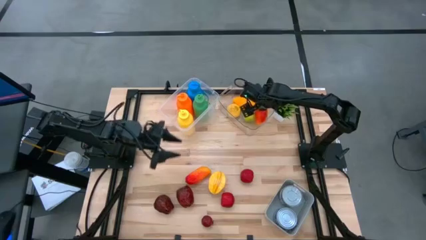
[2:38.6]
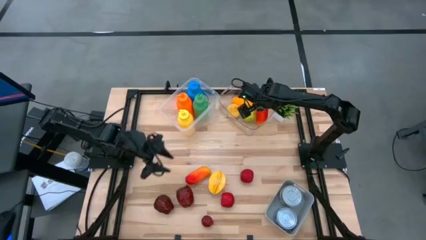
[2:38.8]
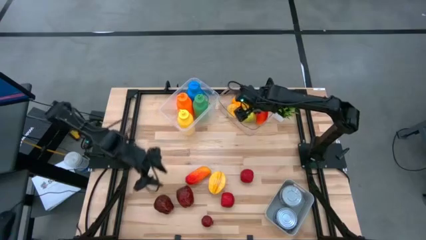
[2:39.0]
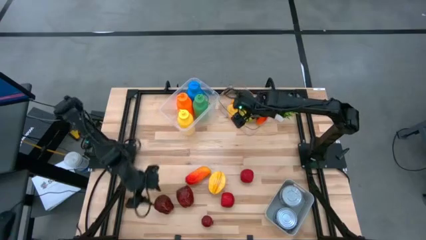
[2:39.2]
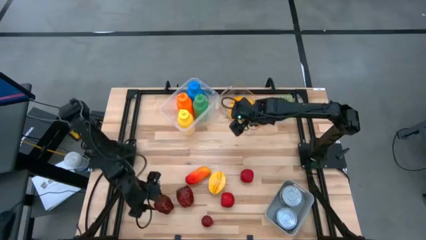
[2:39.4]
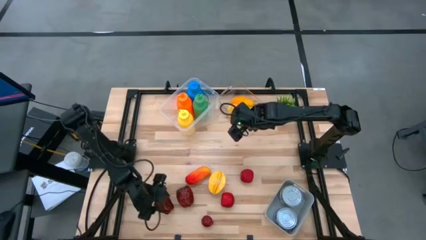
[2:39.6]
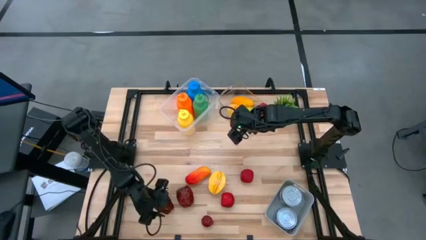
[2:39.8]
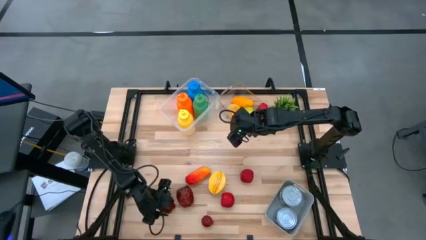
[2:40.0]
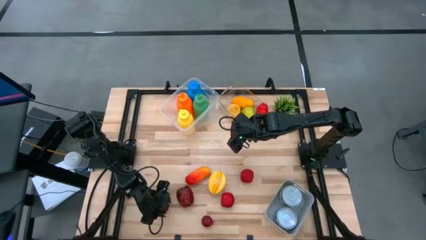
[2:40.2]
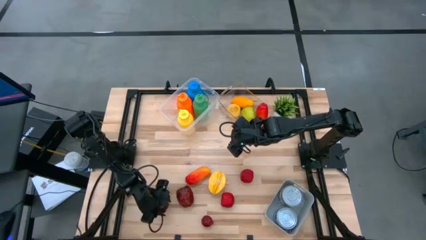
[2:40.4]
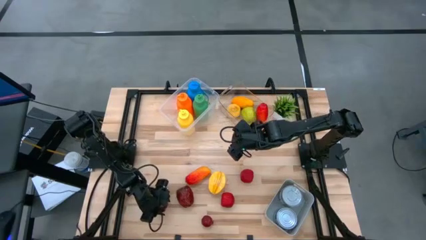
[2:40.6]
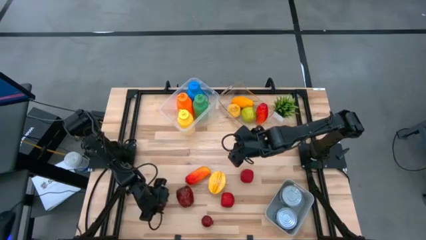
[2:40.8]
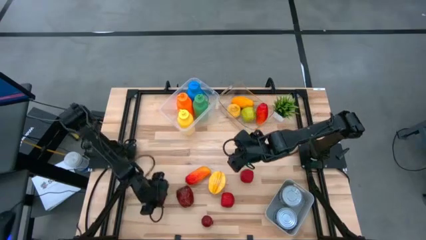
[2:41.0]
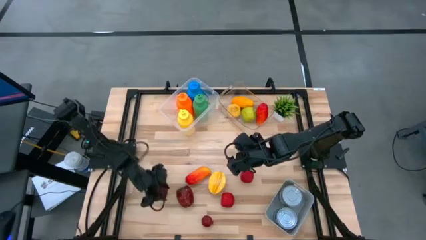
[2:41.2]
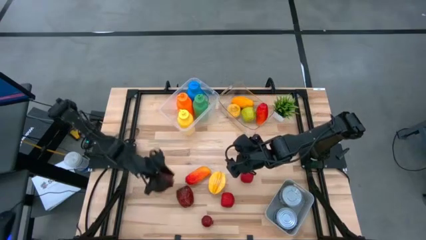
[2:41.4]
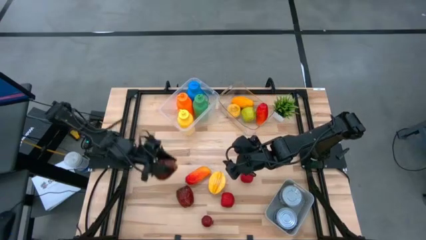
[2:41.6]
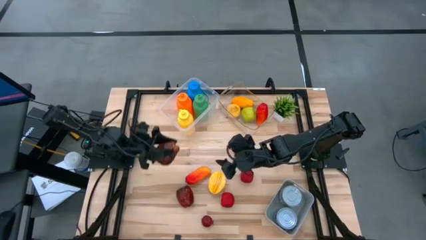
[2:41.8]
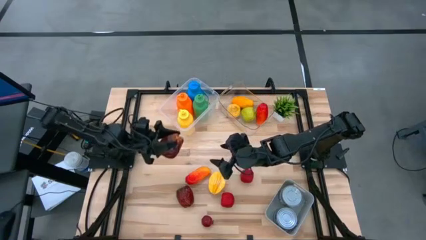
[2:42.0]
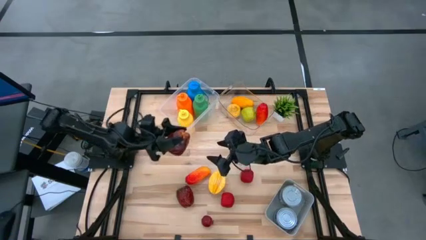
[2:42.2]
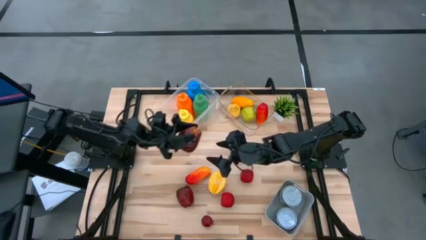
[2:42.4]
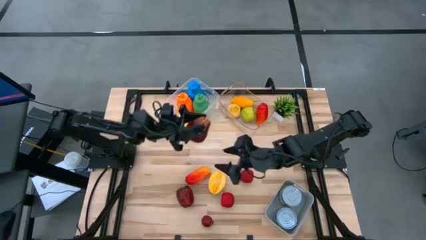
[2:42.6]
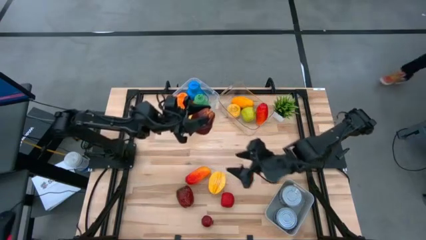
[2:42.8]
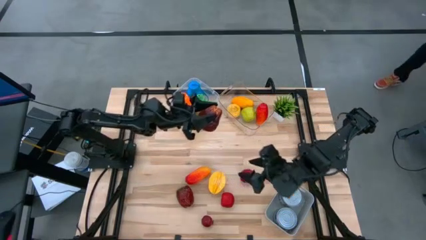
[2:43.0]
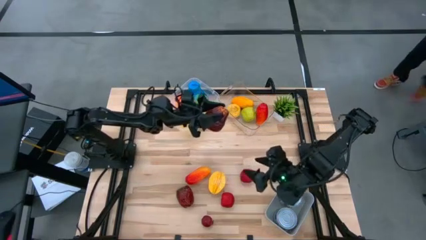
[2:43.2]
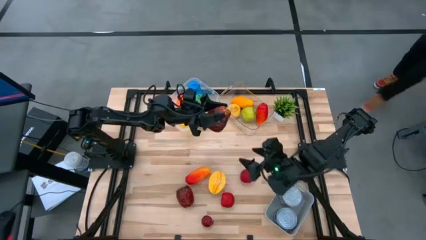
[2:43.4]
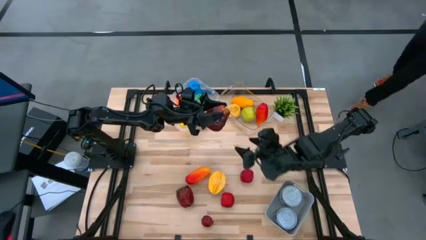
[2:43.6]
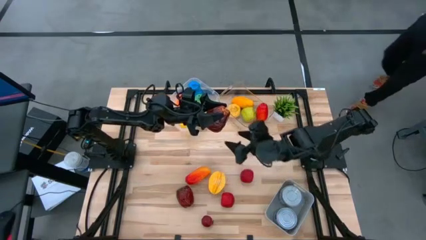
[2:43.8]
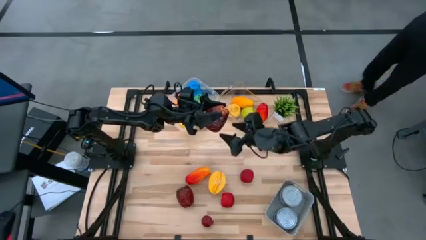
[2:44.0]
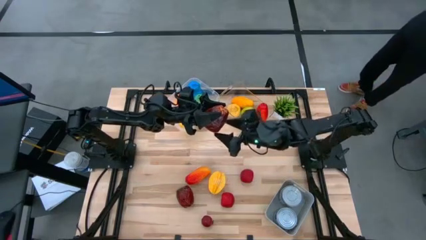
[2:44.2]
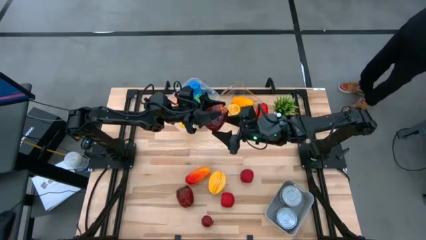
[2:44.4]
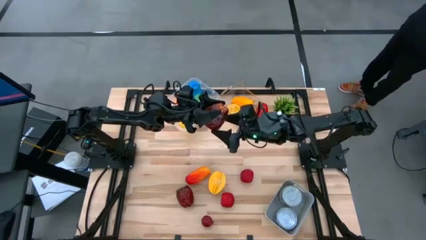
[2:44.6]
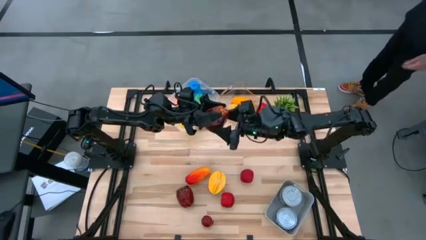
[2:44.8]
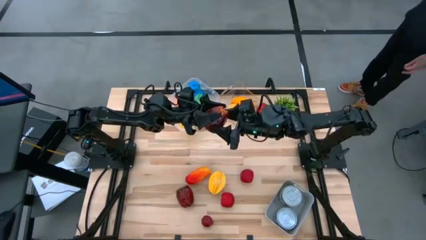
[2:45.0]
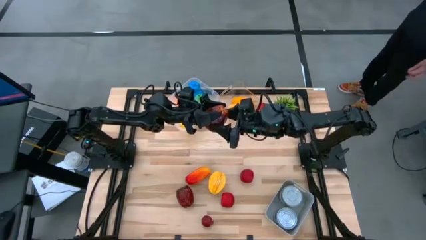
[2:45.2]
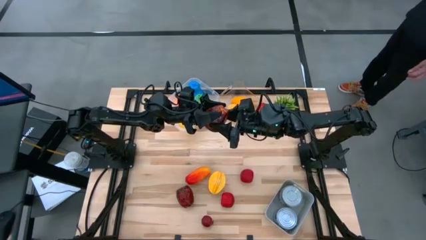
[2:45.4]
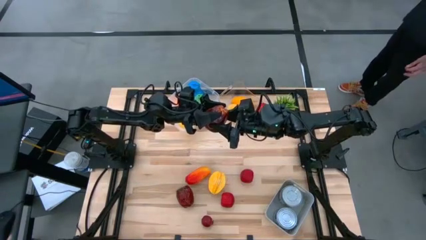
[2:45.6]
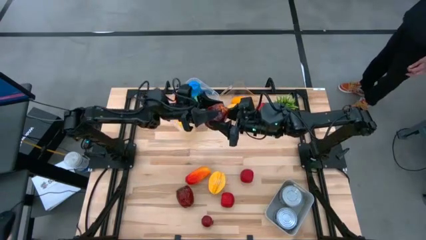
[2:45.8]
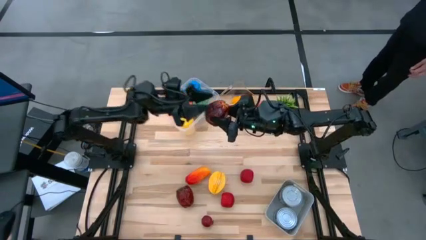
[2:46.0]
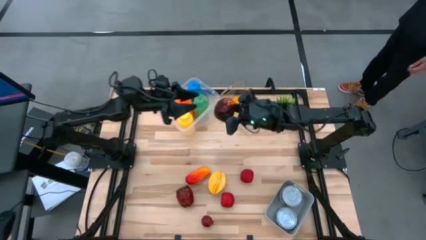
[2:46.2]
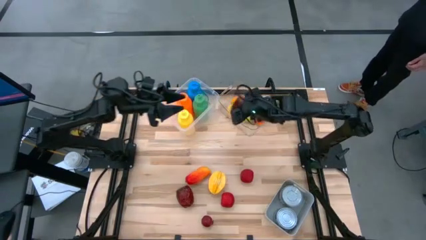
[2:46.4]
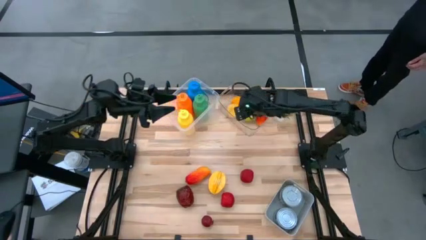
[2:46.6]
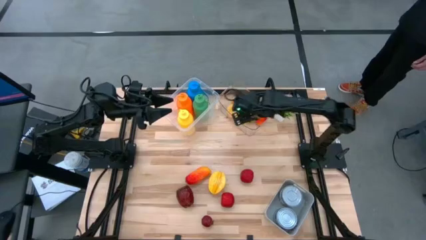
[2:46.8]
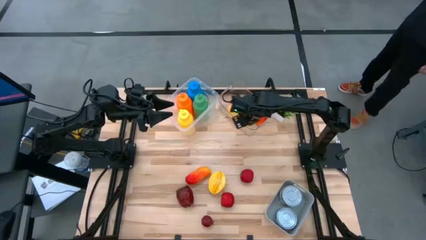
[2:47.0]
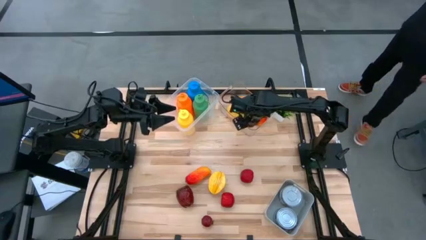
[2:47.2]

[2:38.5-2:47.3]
Task: Pick & Place Food Item
Put the left dark red apple into the right transparent bin

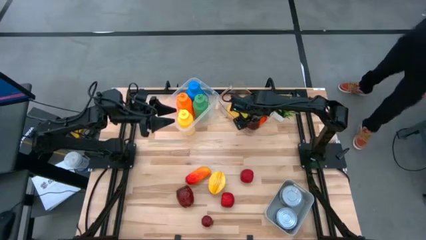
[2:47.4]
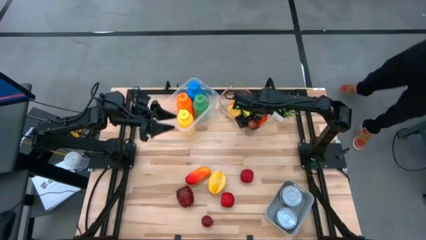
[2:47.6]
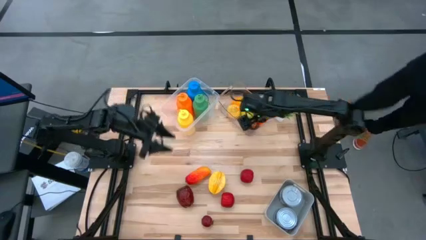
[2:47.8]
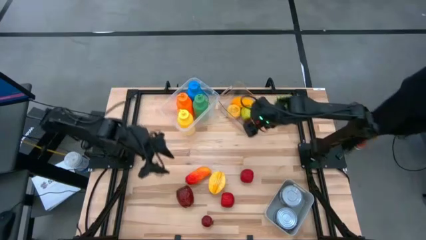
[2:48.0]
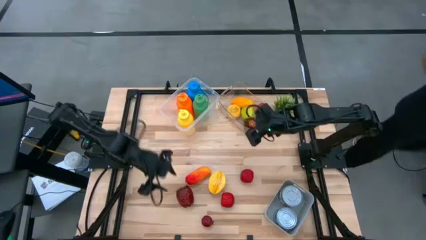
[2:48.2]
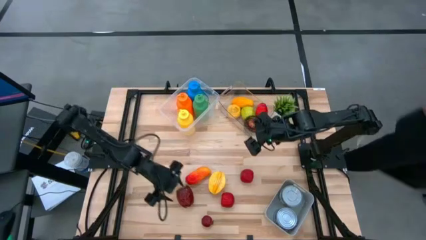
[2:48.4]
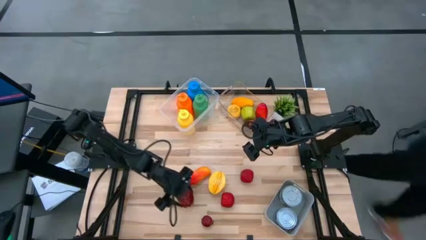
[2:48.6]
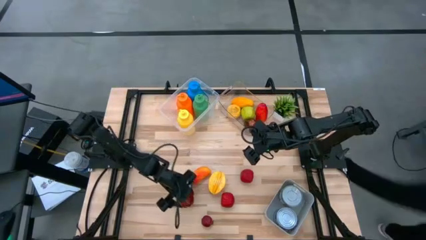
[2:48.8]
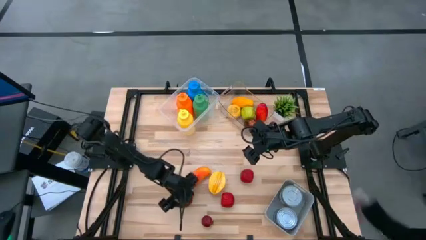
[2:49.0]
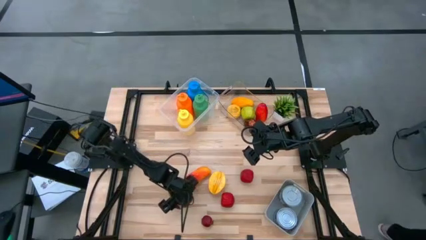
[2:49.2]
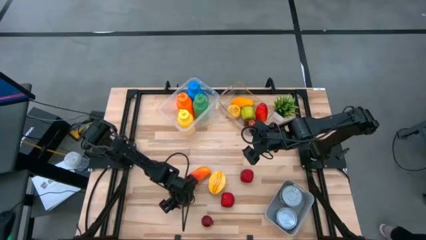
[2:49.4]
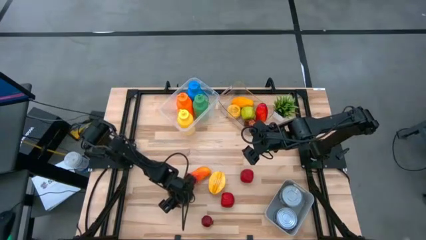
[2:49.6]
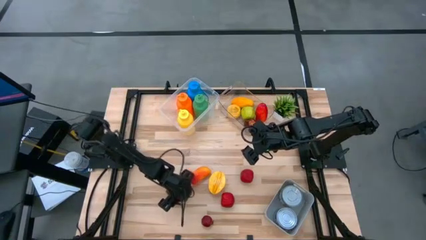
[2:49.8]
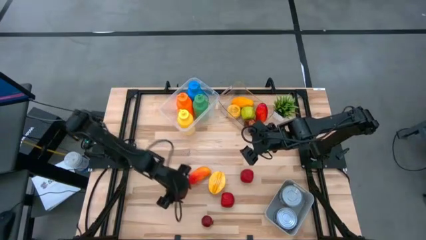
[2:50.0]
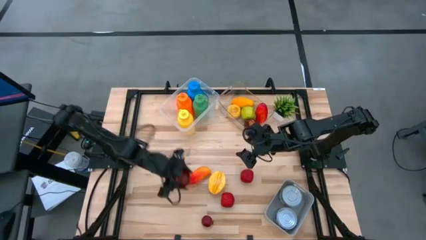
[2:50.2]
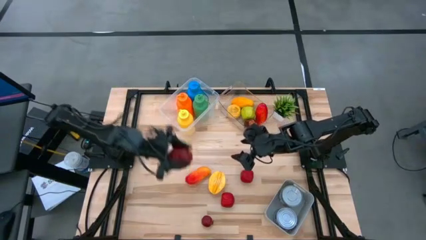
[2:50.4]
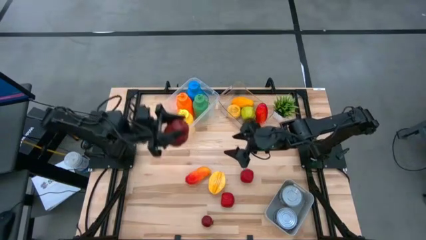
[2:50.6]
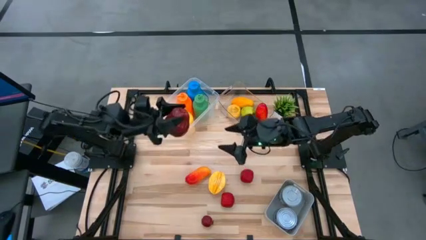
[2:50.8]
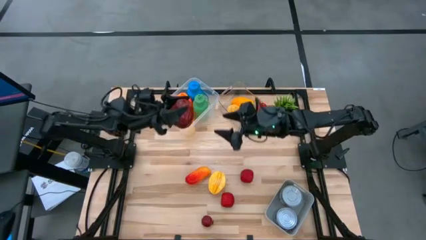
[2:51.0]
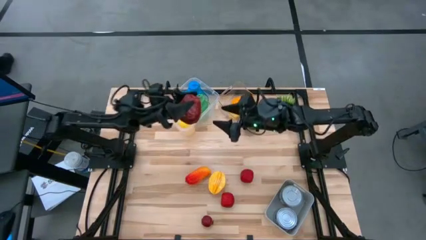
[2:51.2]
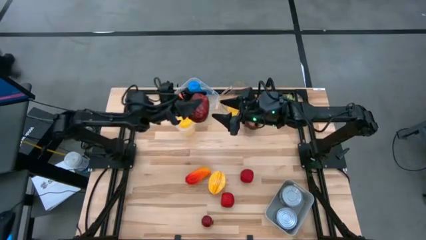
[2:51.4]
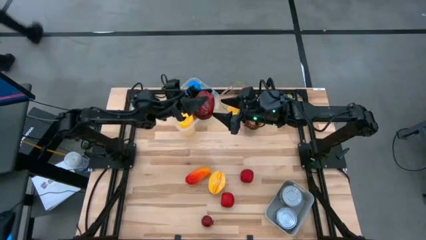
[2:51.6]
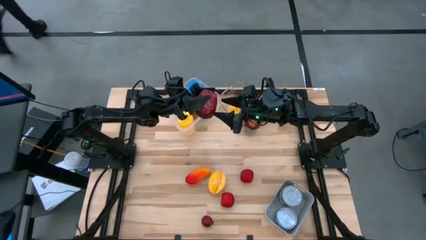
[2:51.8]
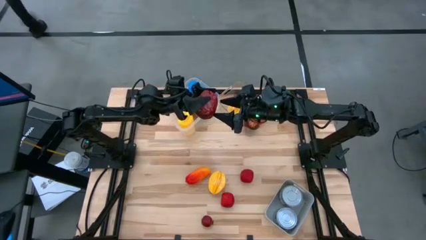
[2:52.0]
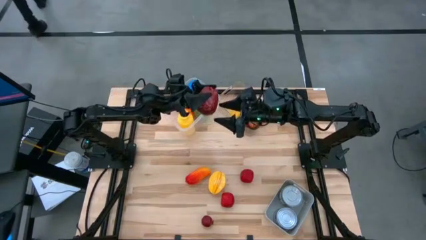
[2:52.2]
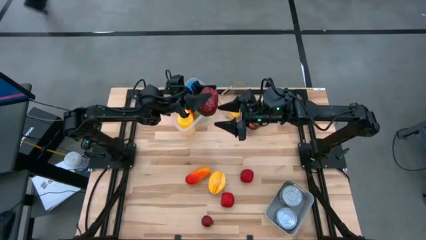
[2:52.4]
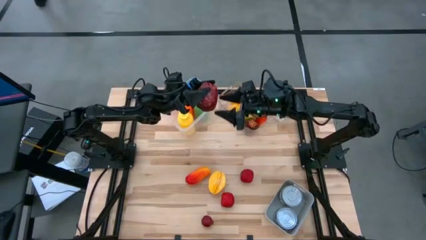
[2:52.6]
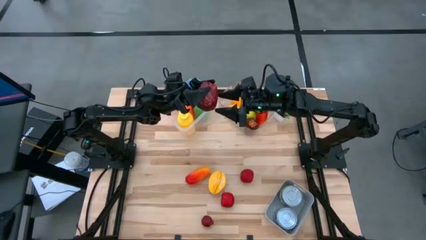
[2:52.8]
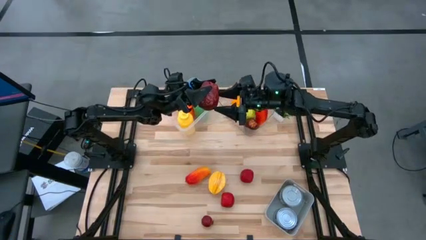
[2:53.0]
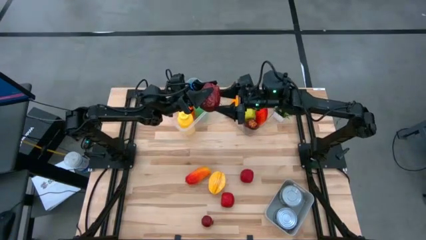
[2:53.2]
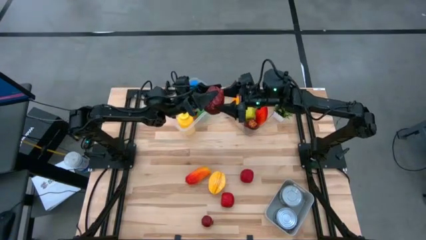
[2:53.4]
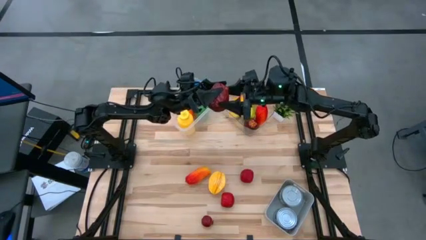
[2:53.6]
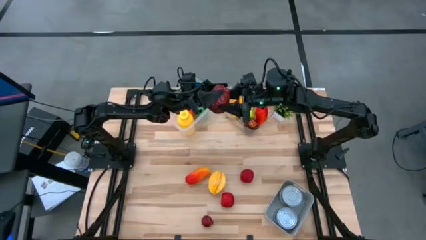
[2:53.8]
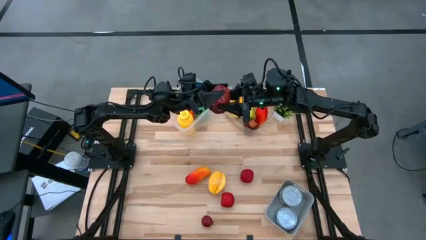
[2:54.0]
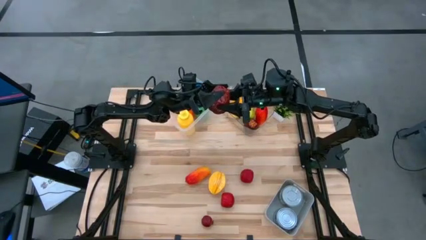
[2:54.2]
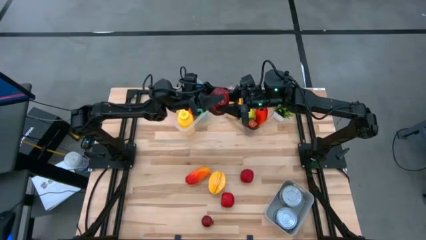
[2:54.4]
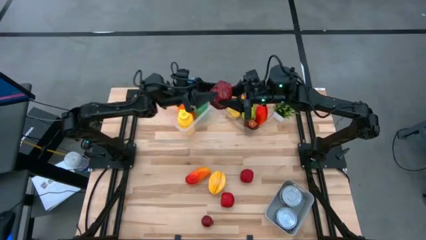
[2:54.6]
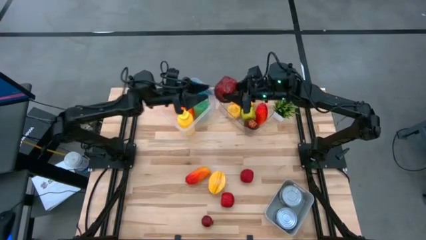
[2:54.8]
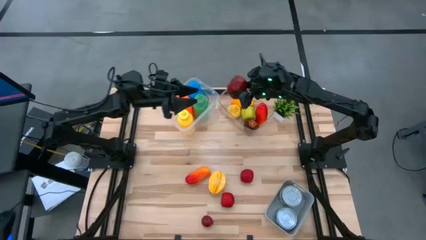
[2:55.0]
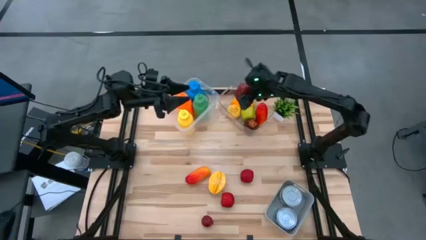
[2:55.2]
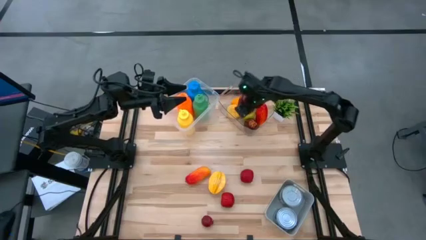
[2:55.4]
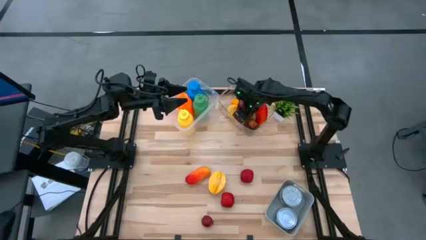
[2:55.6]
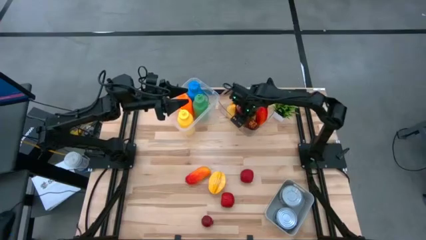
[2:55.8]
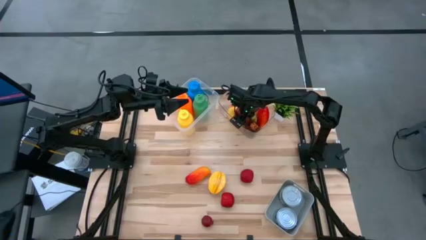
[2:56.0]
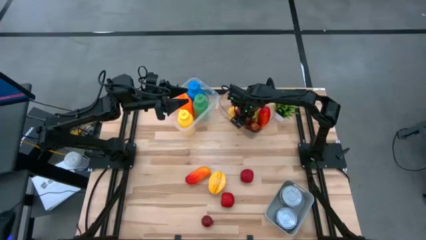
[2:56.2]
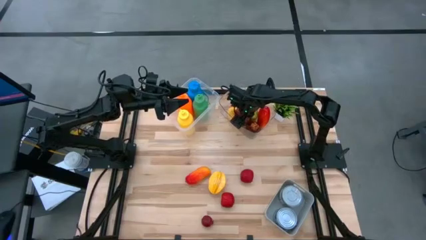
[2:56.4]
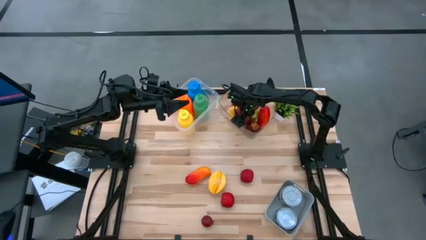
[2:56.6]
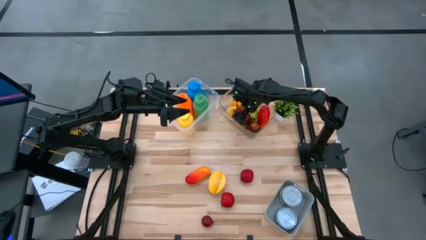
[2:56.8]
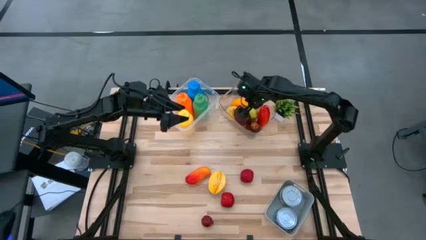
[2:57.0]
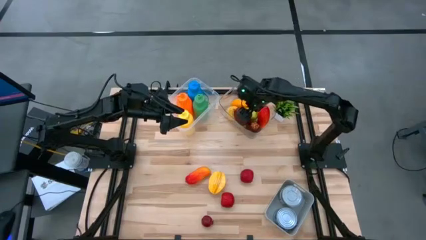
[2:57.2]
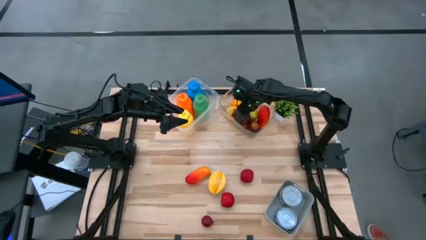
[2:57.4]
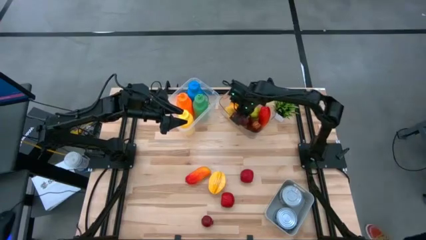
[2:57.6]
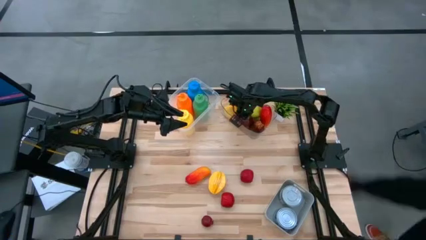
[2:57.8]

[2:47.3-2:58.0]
Put the dark red apple into the right transparent bin
